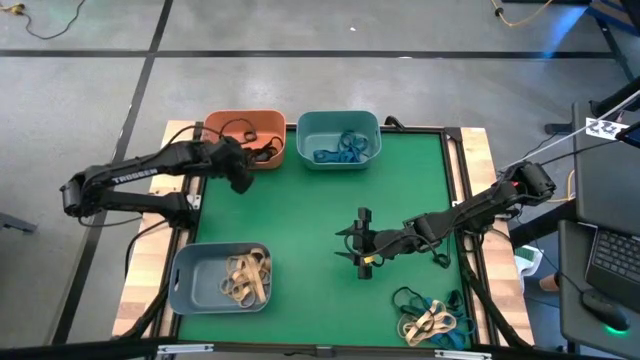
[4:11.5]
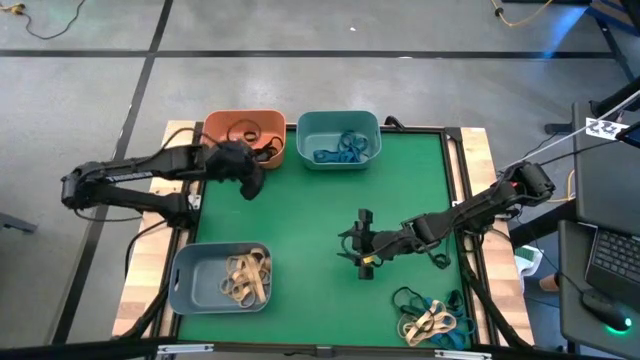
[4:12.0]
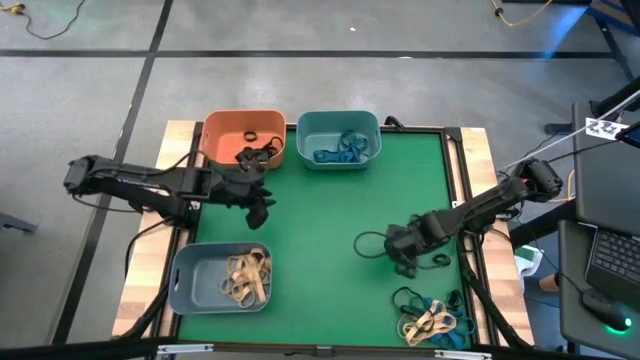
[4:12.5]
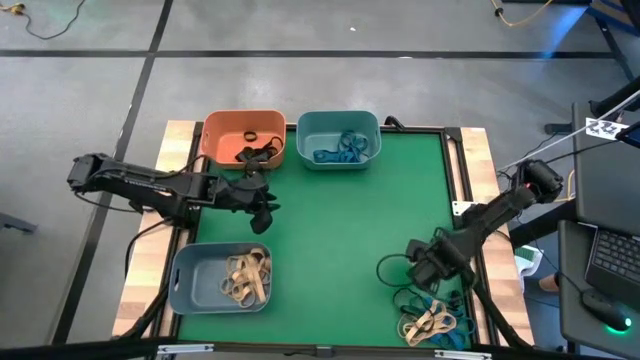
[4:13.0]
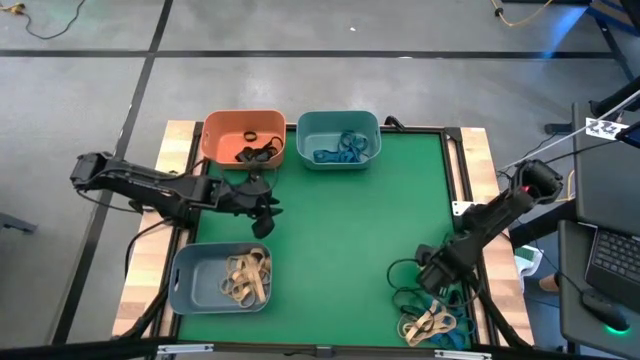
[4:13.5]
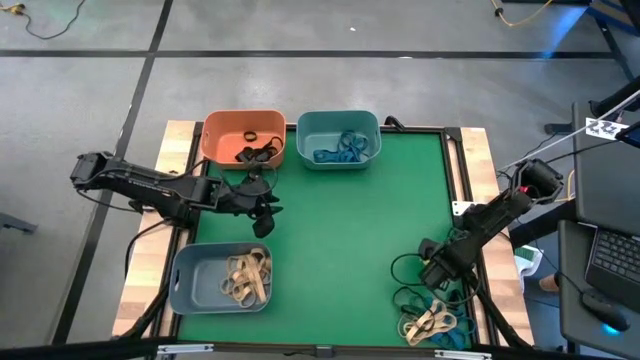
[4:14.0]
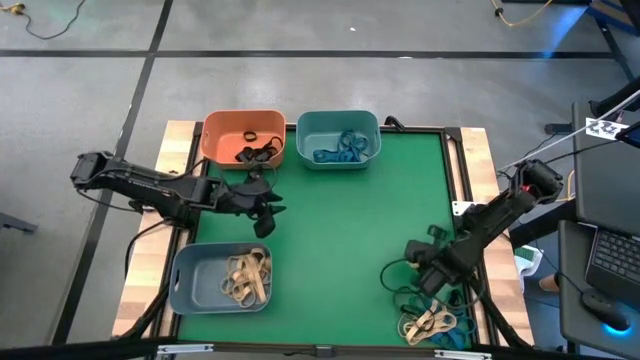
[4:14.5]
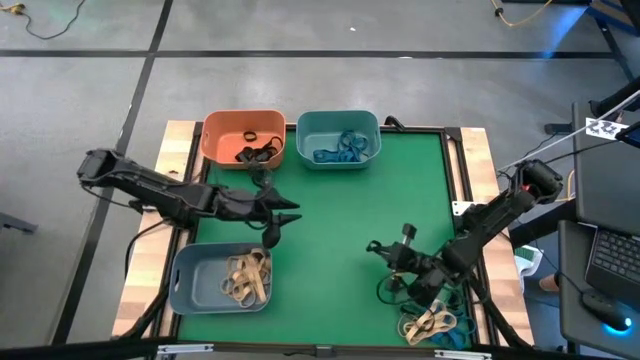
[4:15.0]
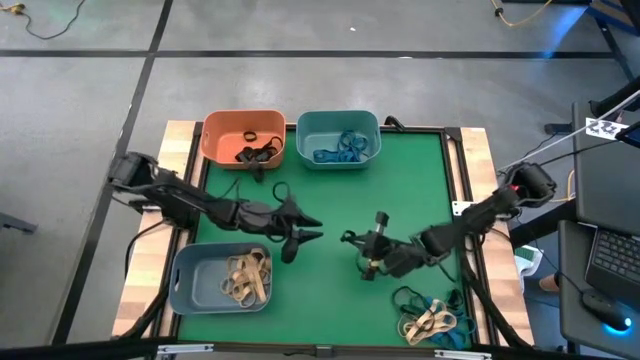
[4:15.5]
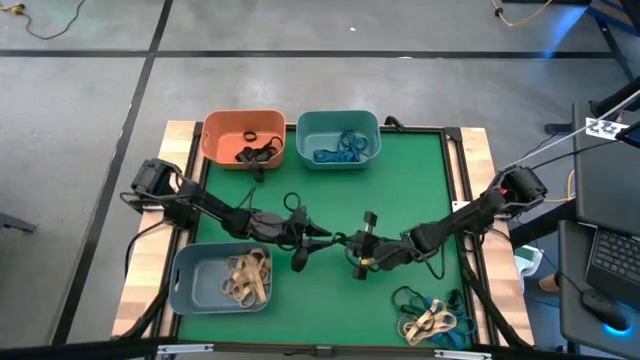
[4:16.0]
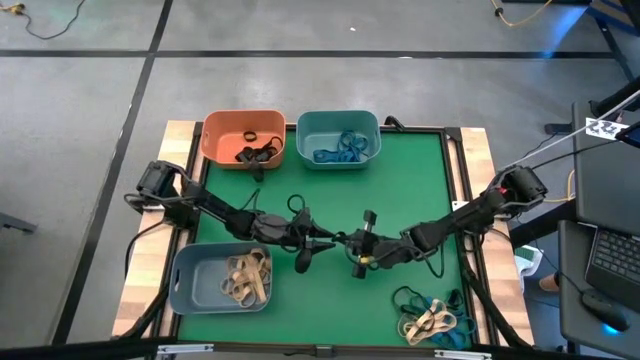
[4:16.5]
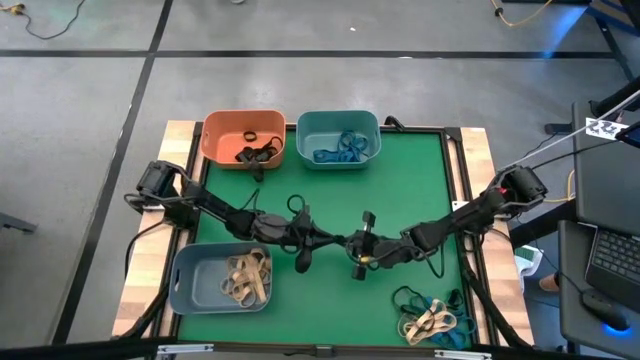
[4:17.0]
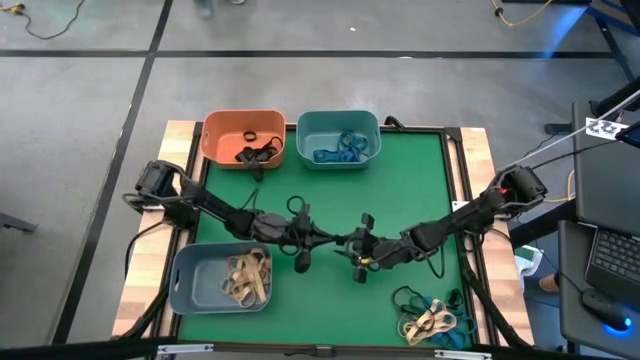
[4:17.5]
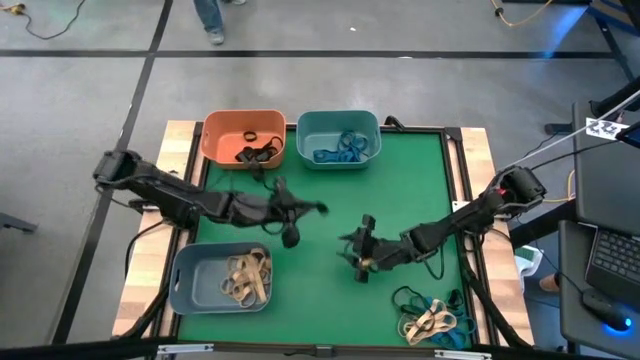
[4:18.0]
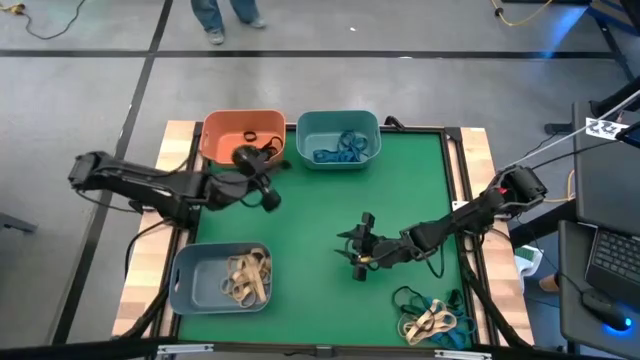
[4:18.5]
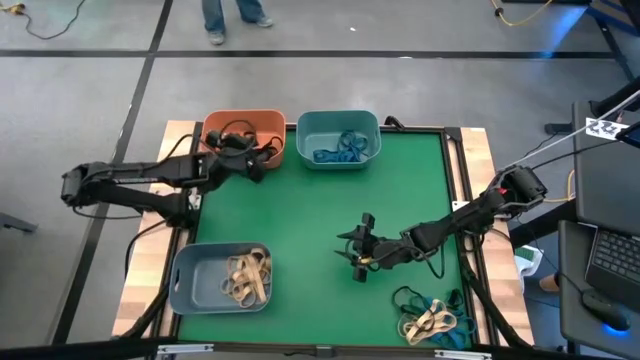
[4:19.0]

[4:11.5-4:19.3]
Task: Sort rubber bands into baskets
Put the black rubber band into the orange bin

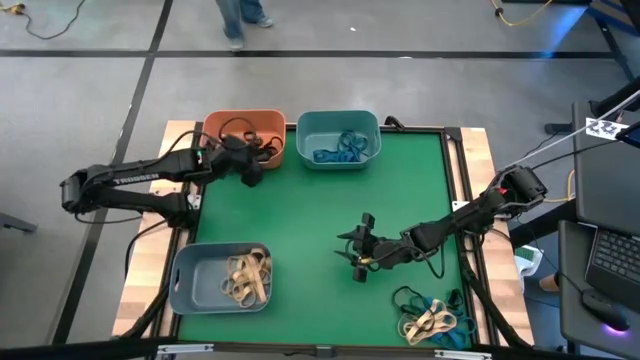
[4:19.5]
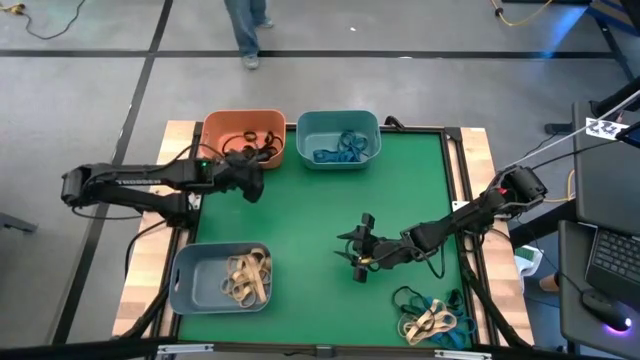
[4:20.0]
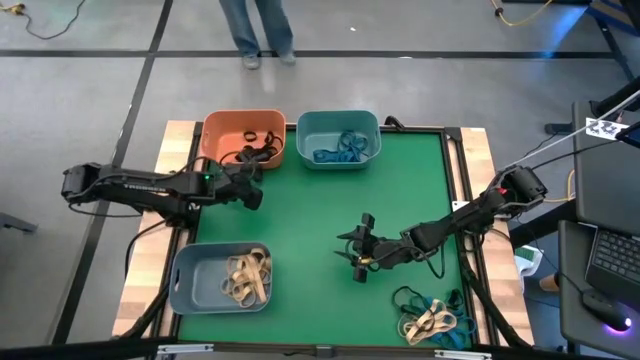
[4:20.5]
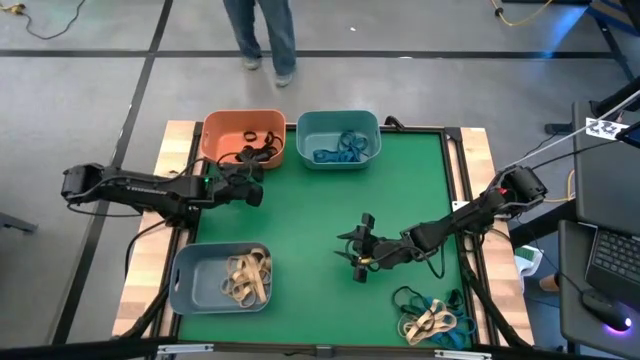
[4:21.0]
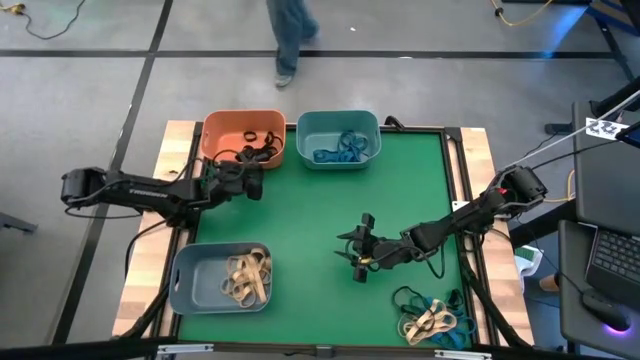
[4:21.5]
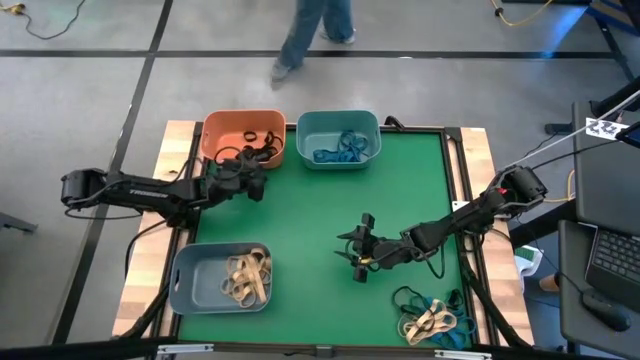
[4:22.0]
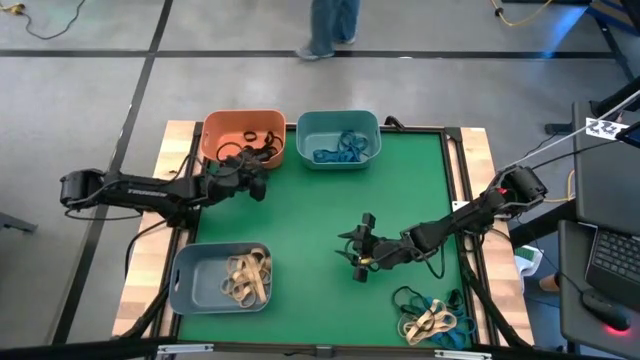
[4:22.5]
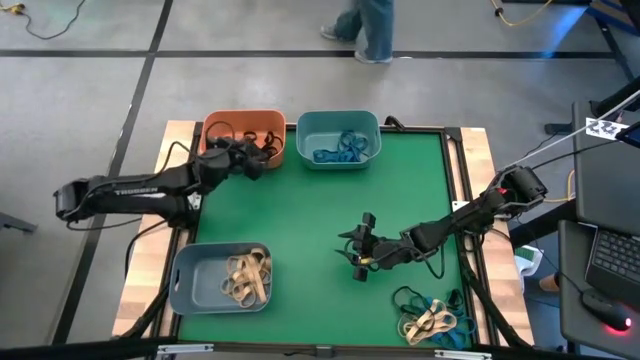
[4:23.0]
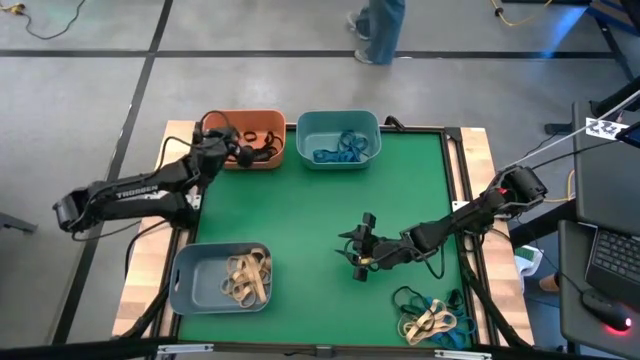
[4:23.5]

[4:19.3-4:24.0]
Put the black rubber band into the orange bin

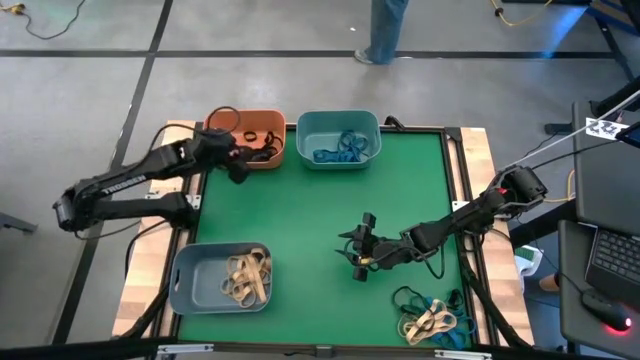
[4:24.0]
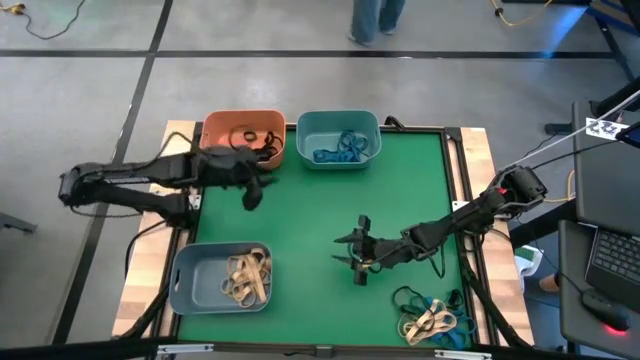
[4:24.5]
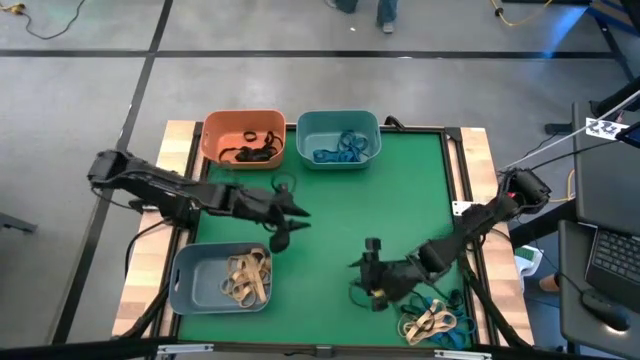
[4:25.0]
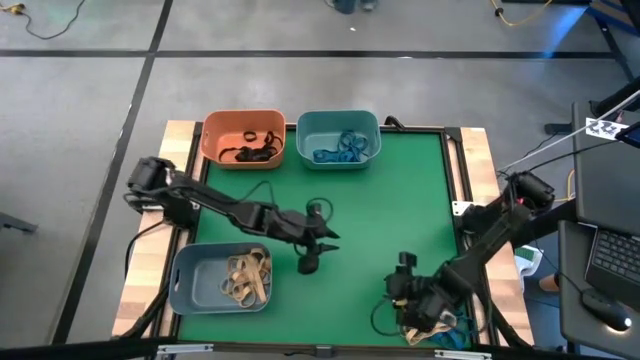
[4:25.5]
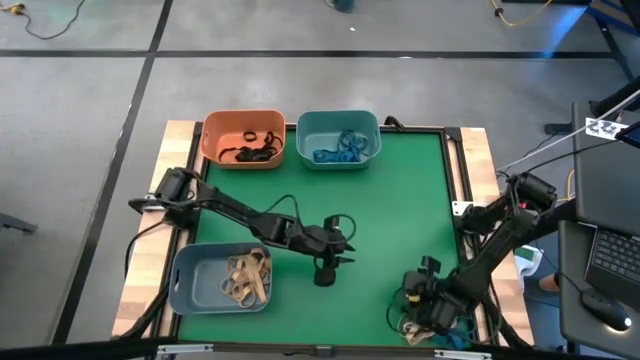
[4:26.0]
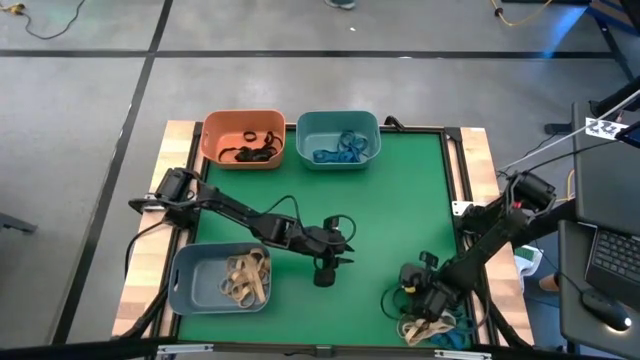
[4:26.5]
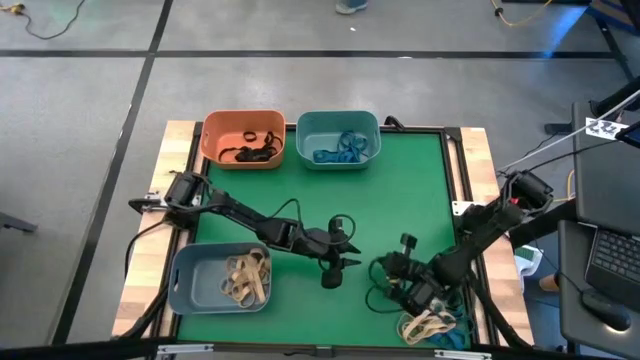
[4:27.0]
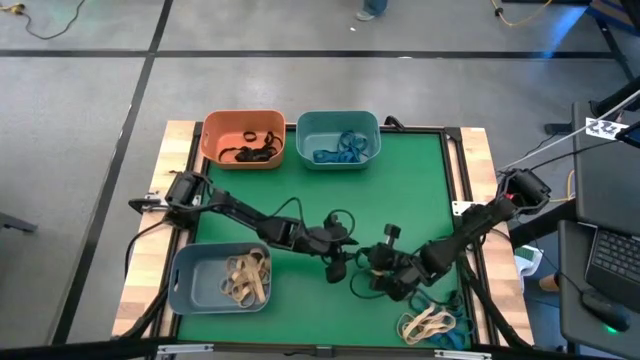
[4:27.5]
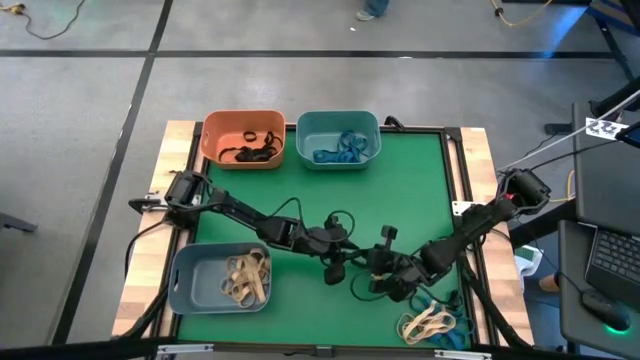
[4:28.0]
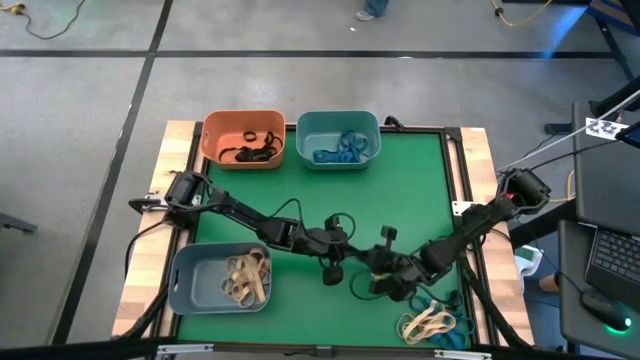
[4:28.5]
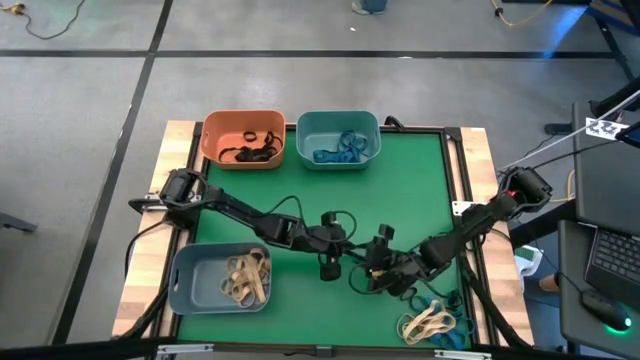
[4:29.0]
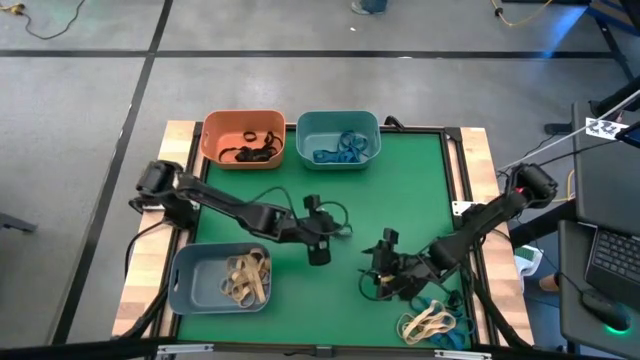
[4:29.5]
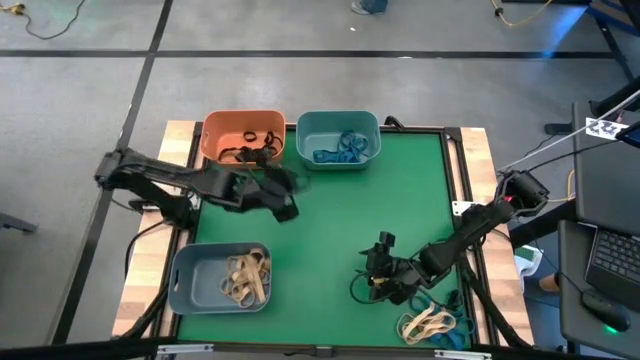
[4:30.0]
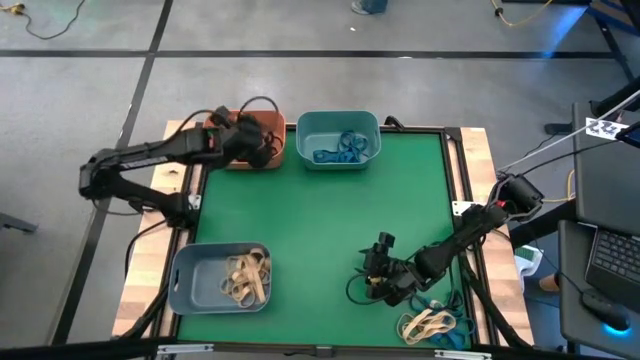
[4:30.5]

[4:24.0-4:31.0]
Put the black rubber band into the orange bin

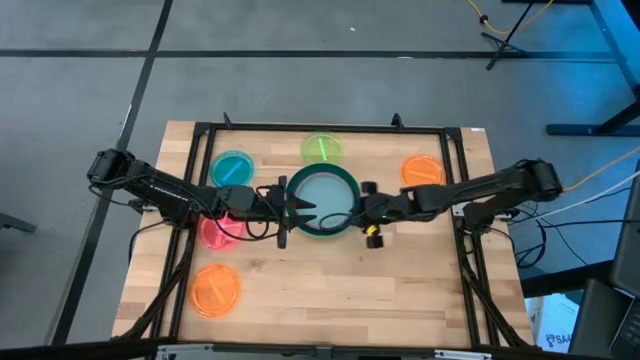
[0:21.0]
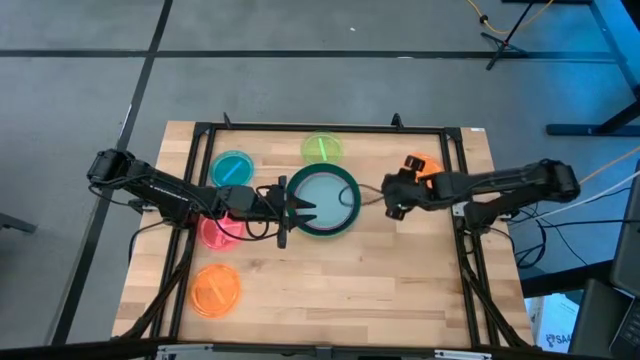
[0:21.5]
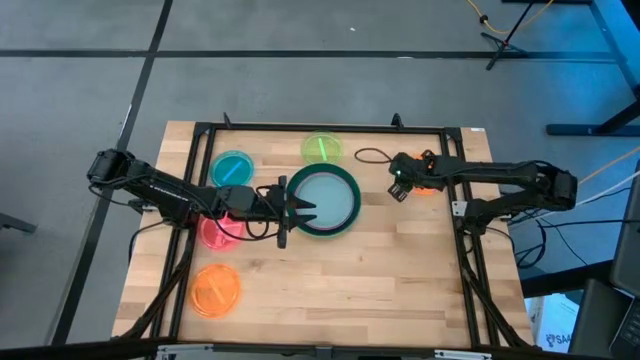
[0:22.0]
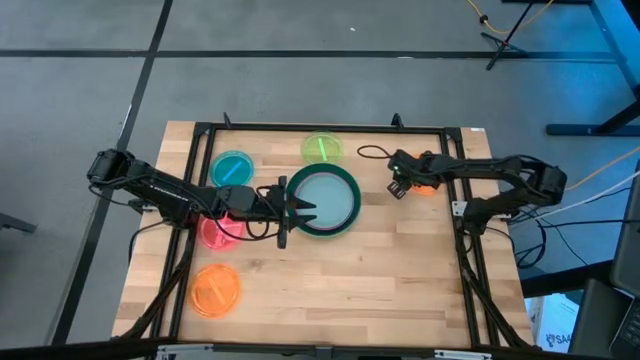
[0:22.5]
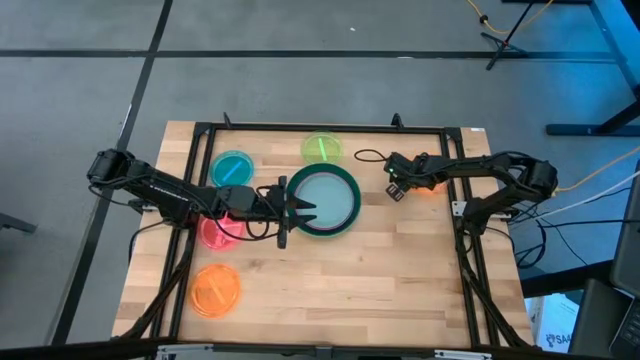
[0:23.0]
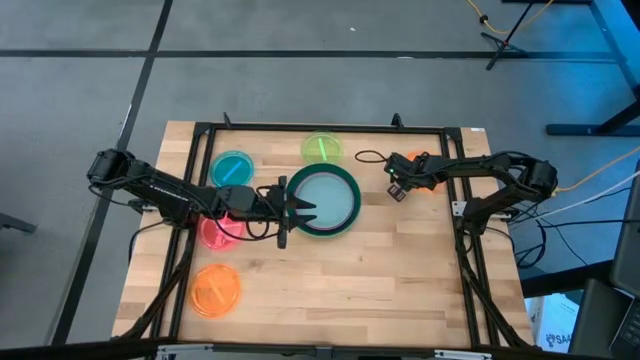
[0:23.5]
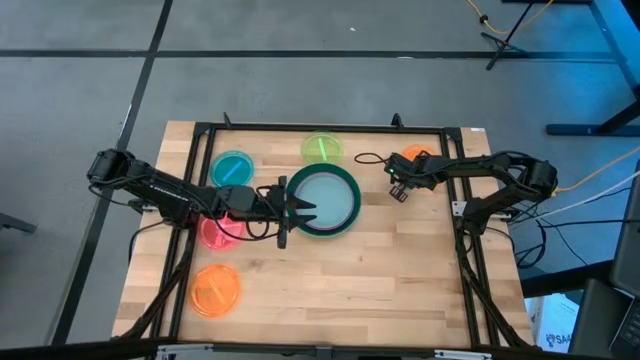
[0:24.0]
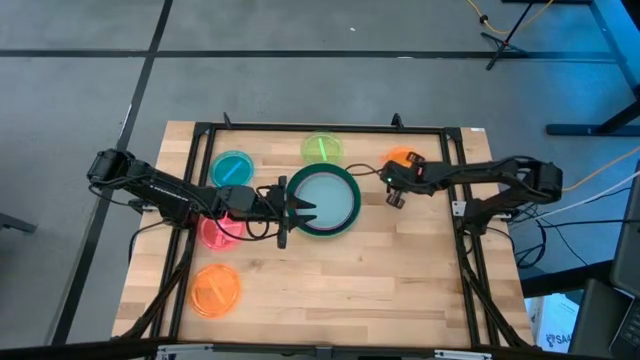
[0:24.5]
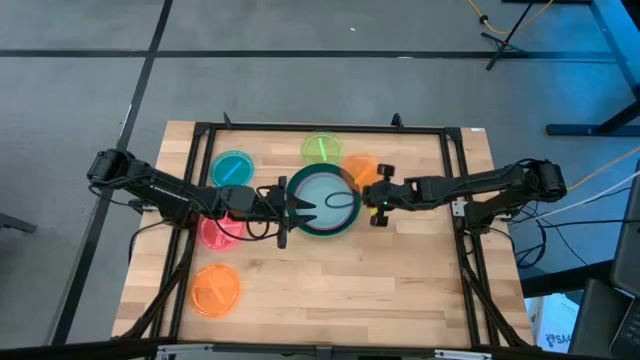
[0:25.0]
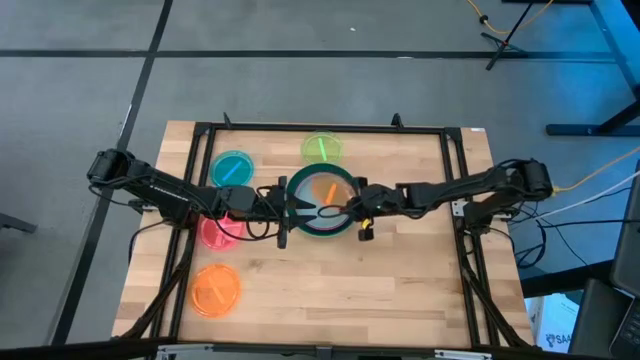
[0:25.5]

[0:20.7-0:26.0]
Task: Stack plastic plates
Stack the top orange plate on top of the gray plate
